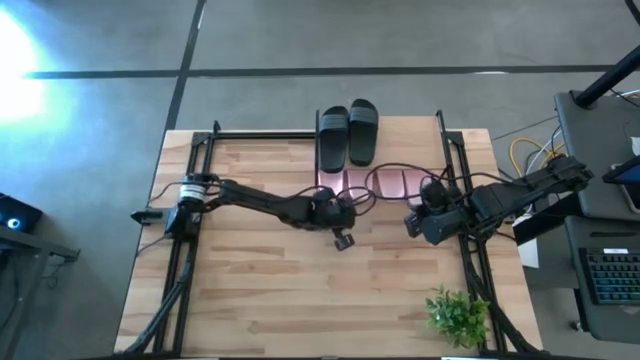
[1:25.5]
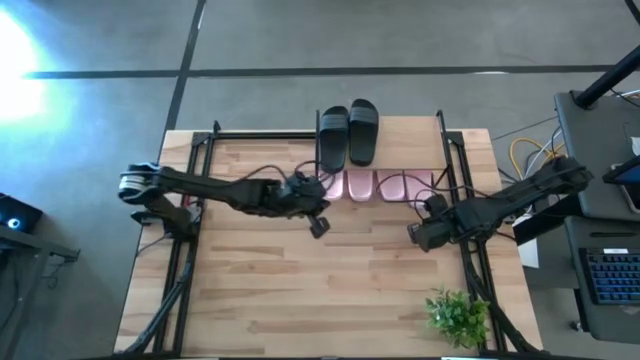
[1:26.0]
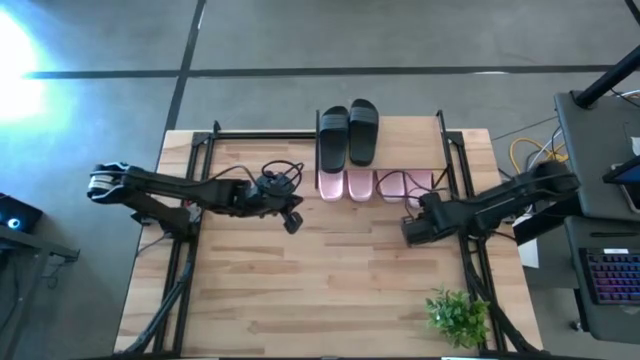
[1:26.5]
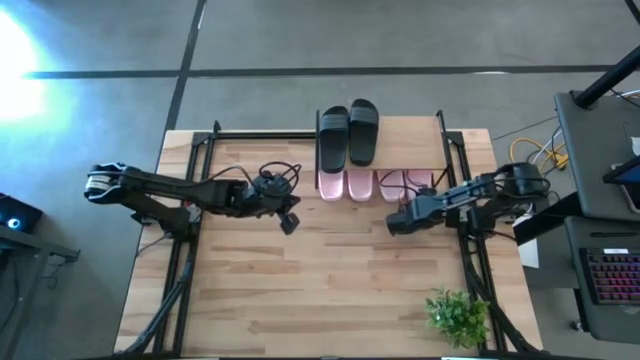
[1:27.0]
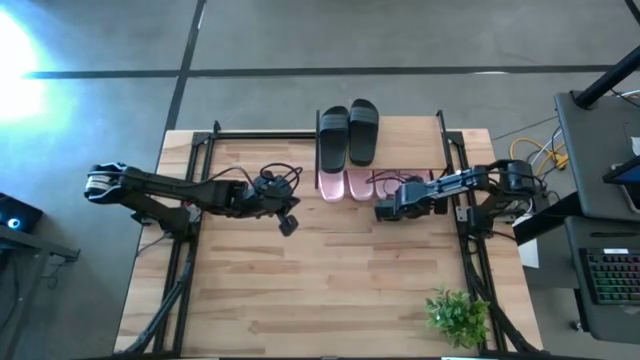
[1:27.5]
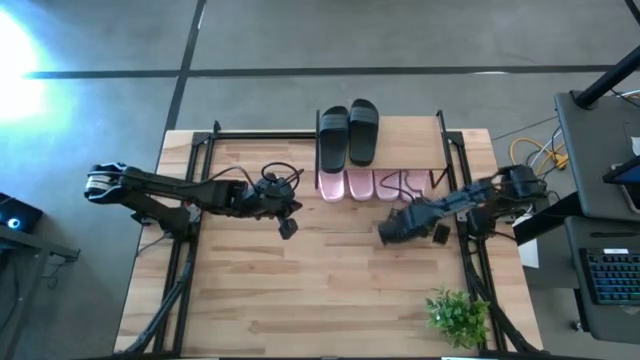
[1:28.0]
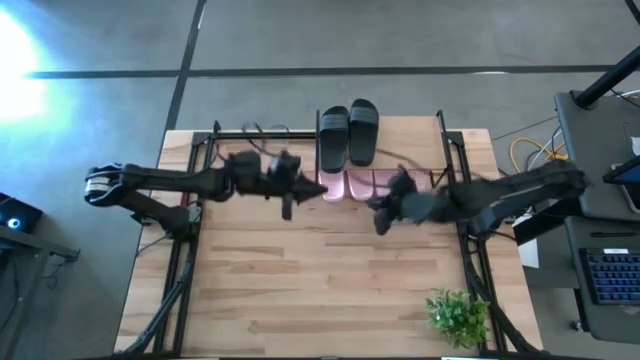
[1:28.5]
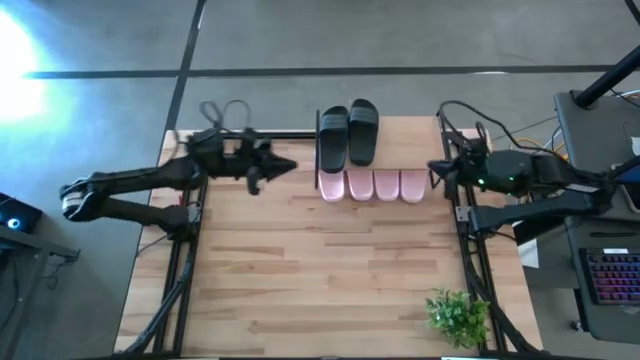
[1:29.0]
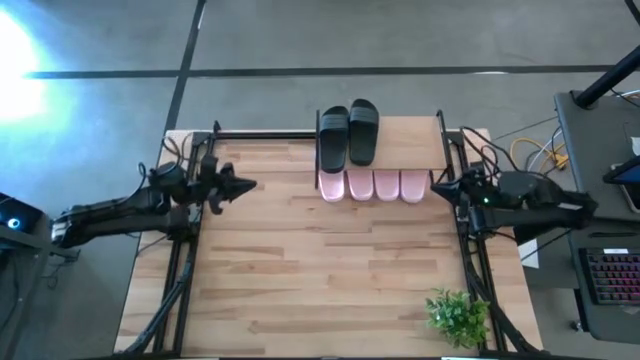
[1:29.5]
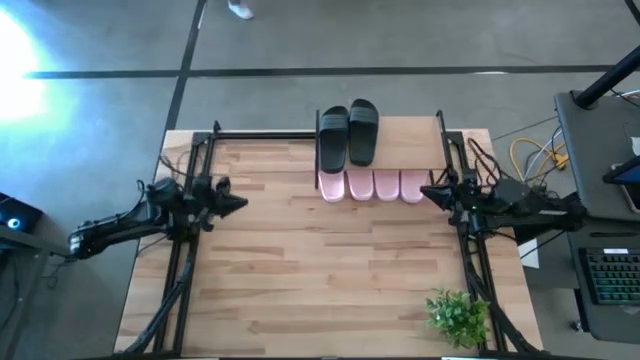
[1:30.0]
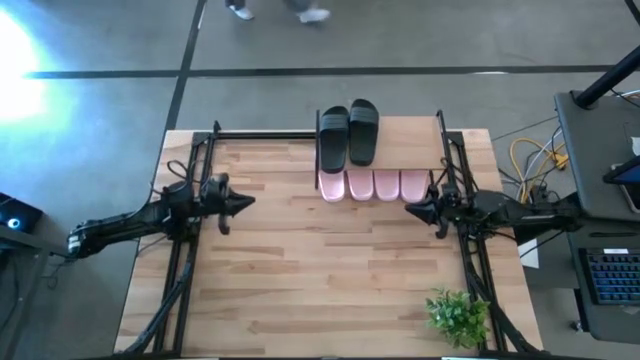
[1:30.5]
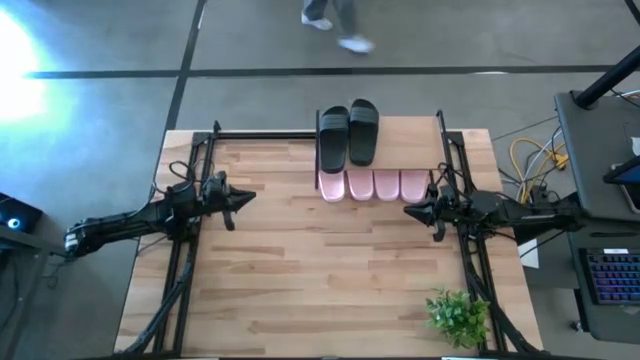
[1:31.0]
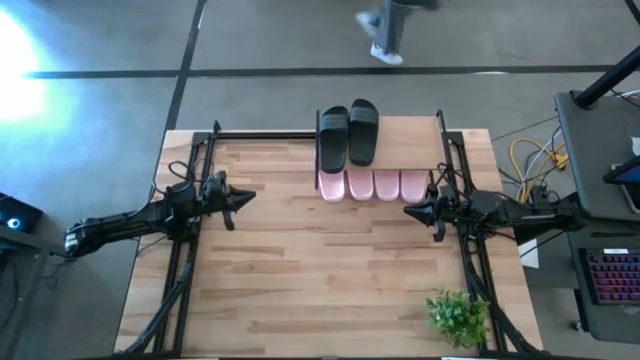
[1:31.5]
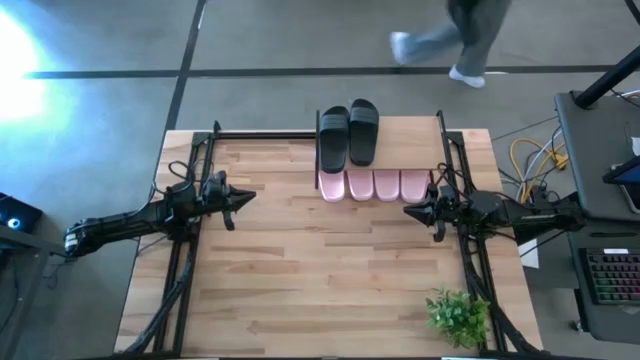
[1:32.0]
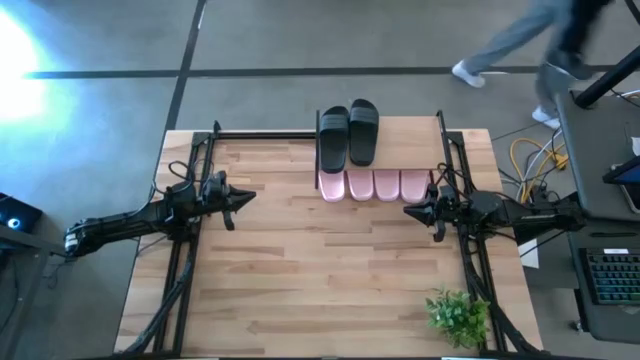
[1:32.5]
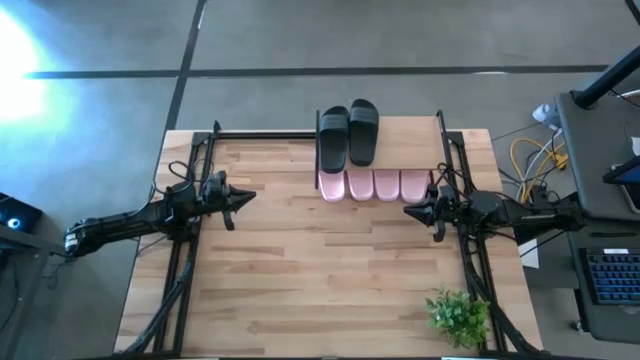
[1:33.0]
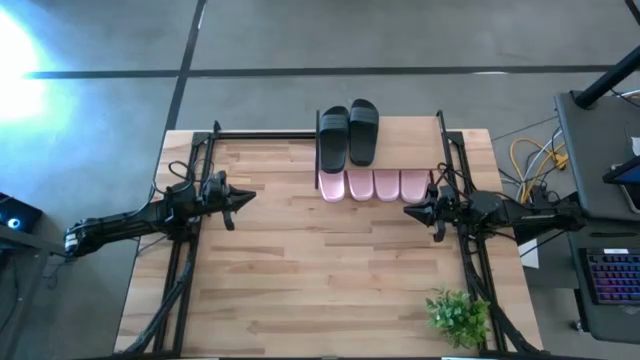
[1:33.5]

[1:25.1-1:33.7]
Task: Pick and place slides into the shelf
Return to Home Position

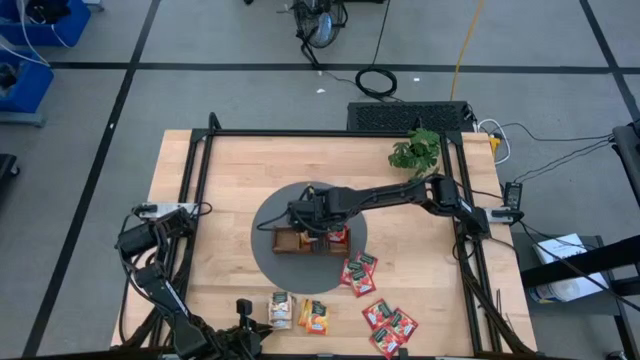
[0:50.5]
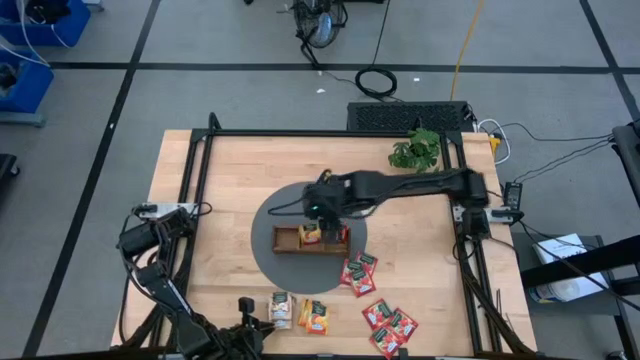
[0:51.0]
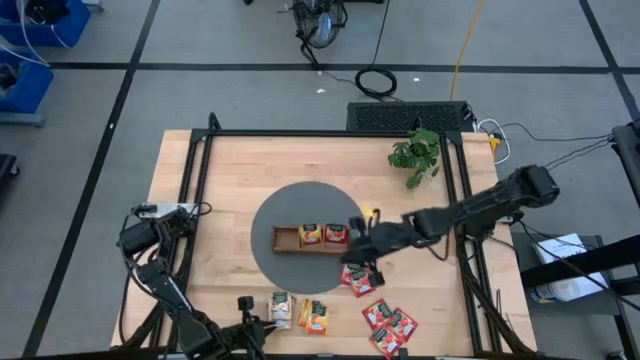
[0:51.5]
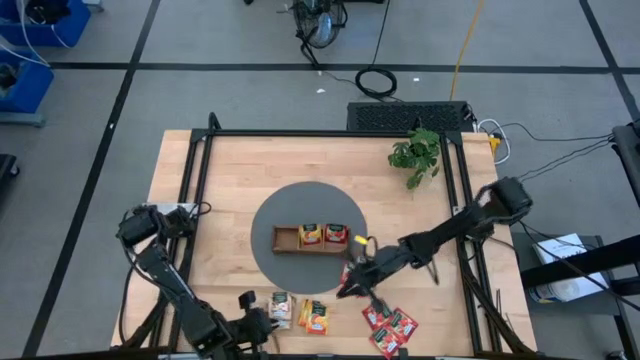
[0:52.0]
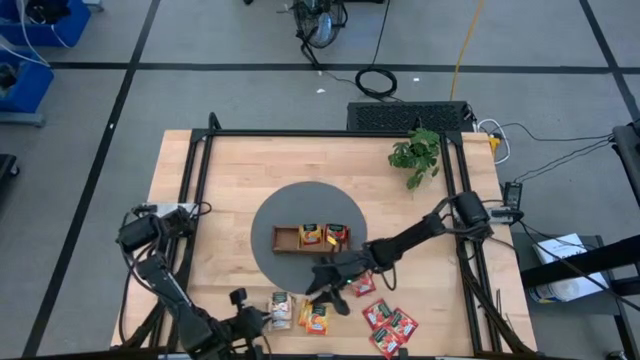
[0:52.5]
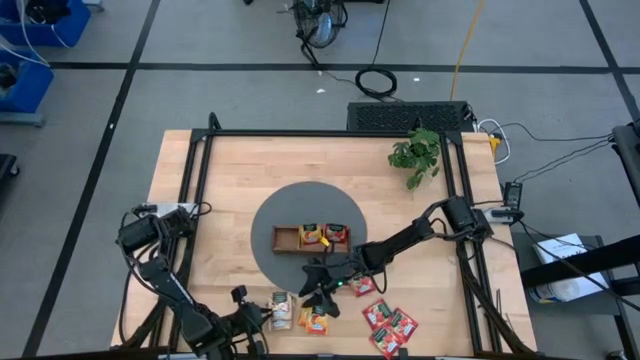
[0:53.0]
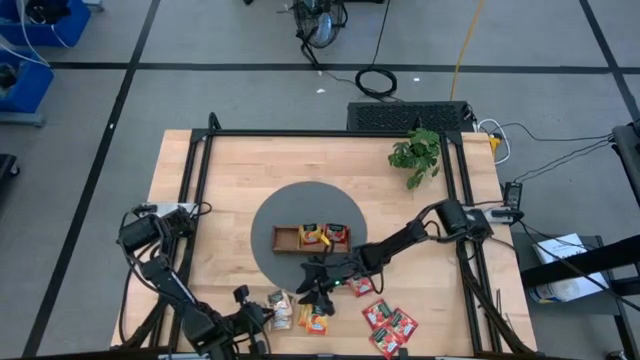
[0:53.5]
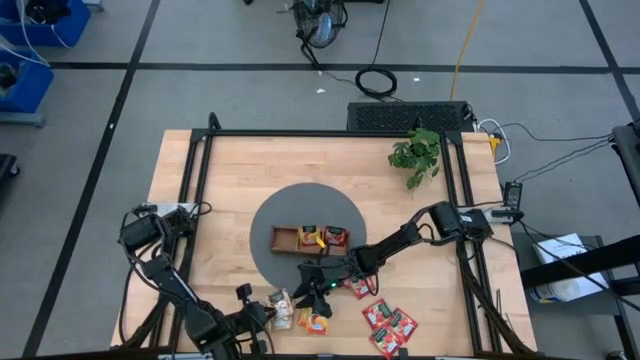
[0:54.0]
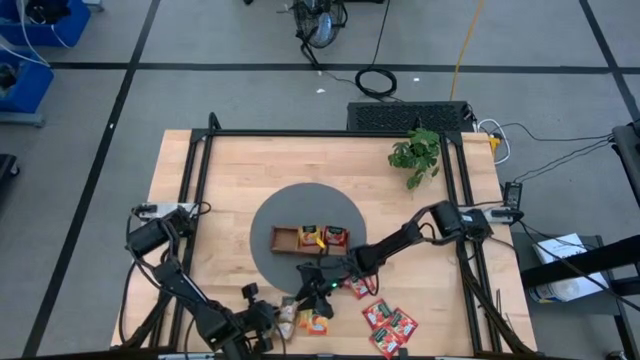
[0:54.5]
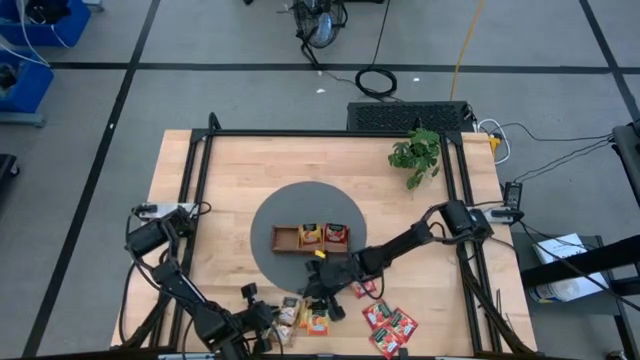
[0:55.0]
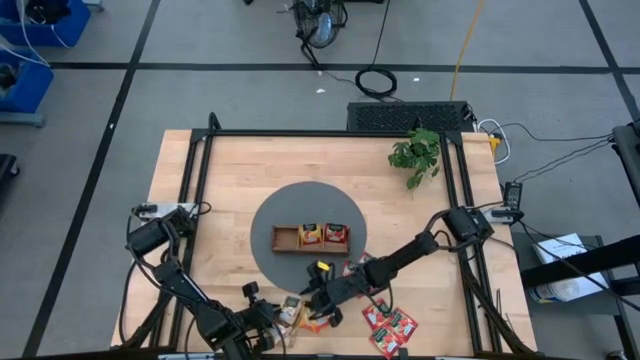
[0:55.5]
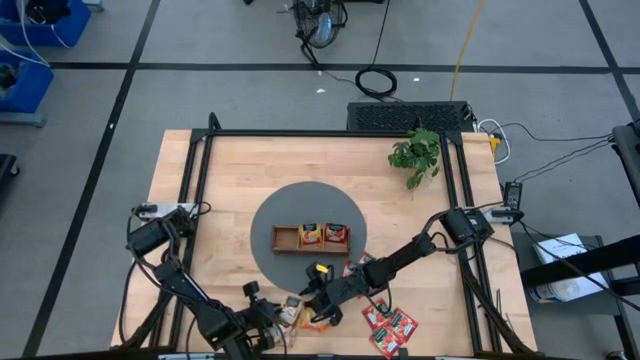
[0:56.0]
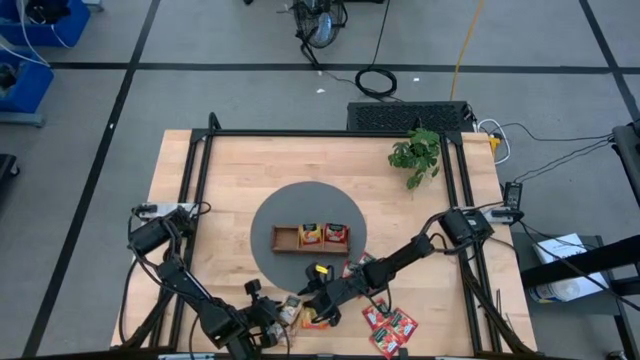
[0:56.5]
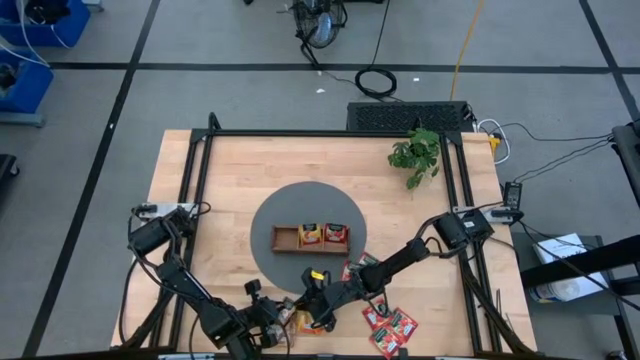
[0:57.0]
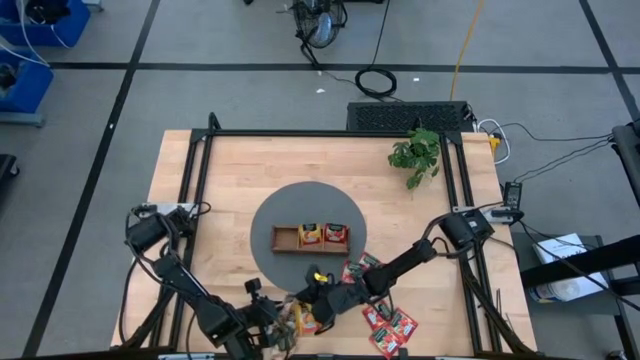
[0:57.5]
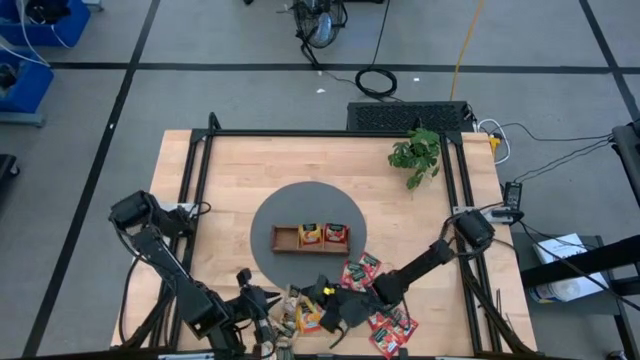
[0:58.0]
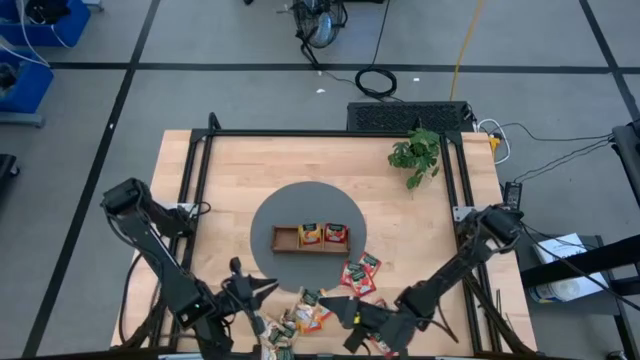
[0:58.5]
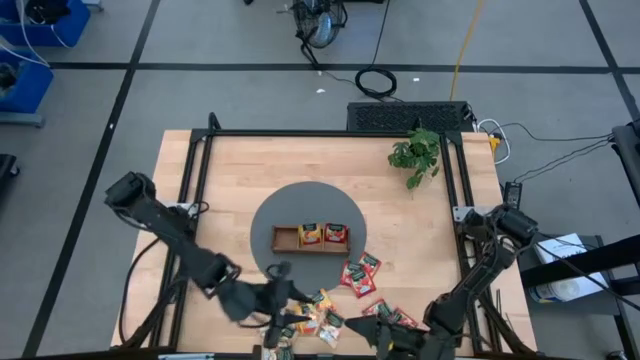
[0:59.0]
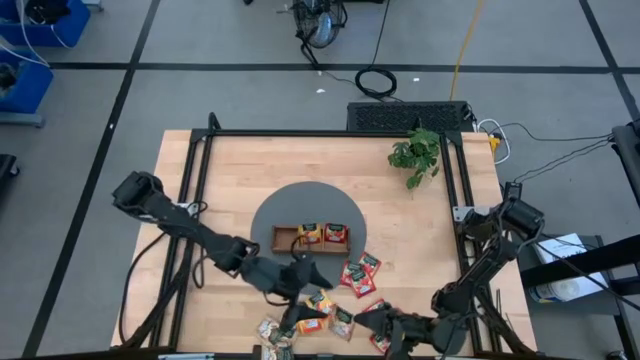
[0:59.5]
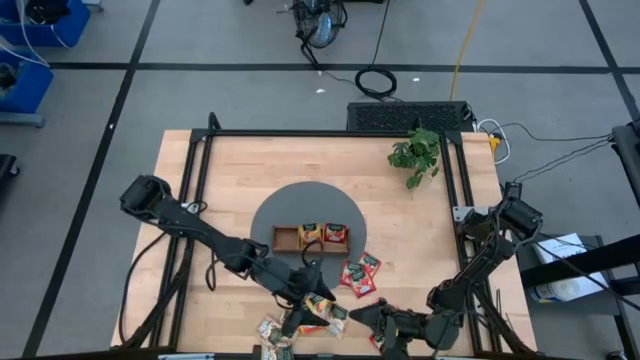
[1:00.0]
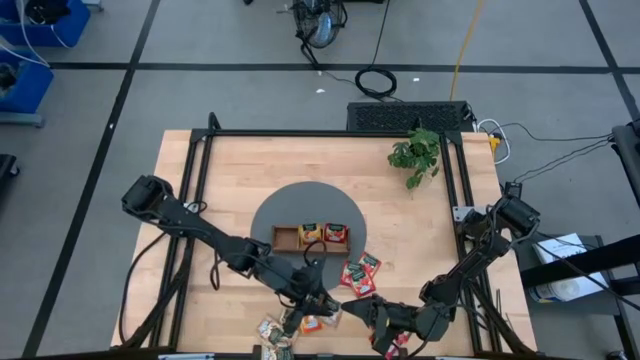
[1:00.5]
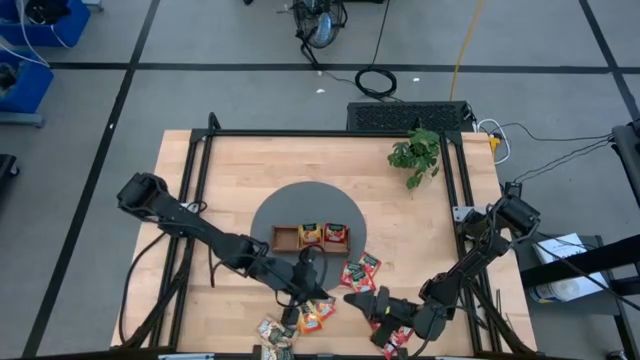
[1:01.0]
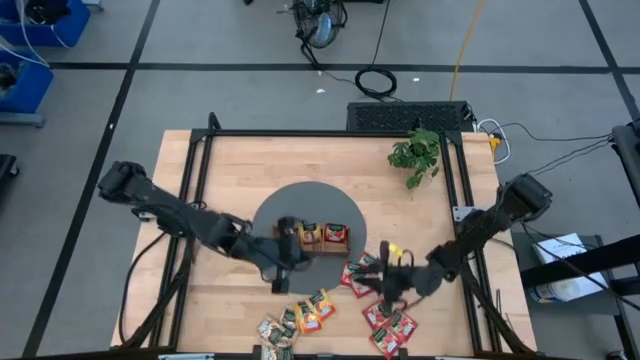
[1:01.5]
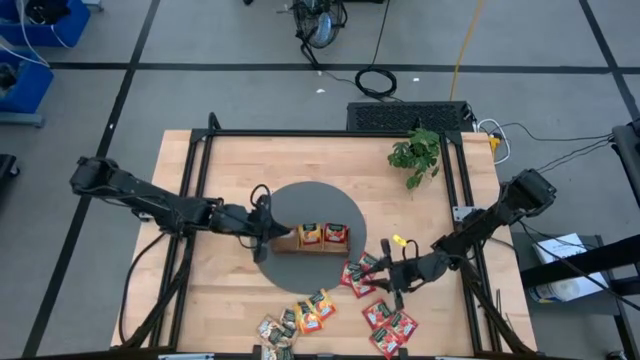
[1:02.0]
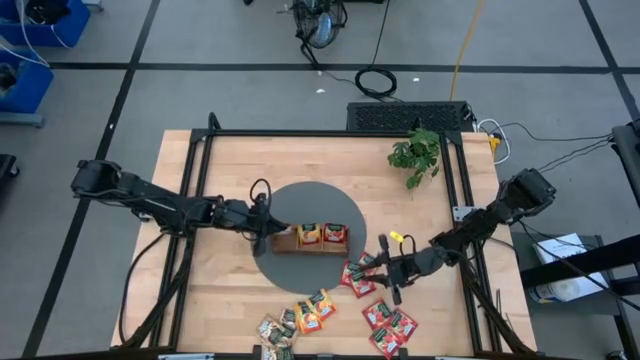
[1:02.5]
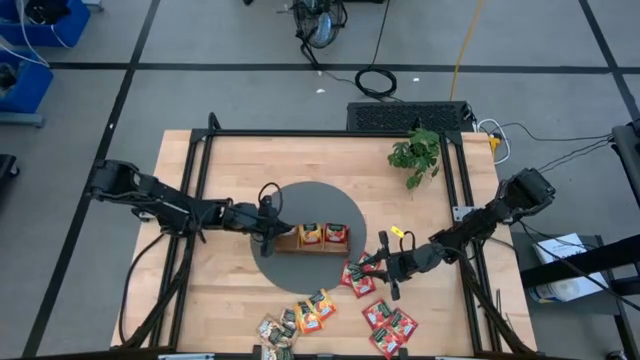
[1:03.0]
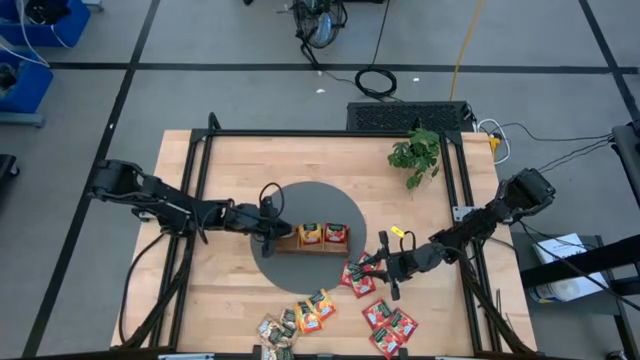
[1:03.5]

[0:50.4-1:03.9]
Task: Pick & Place Tea
Put the light brown tea sachet into the left section of the wooden organizer

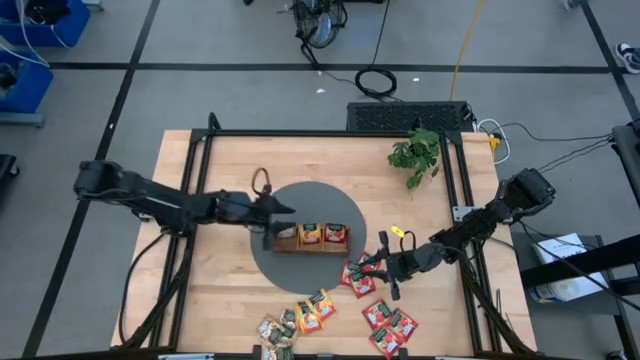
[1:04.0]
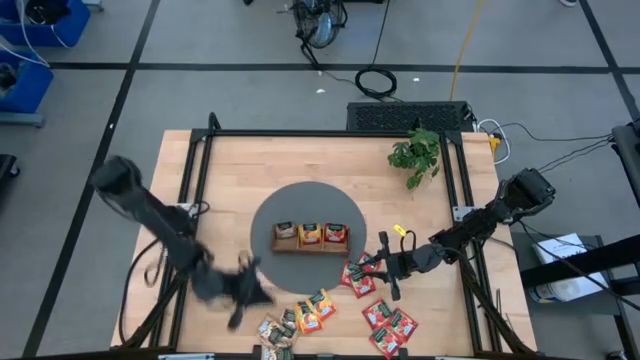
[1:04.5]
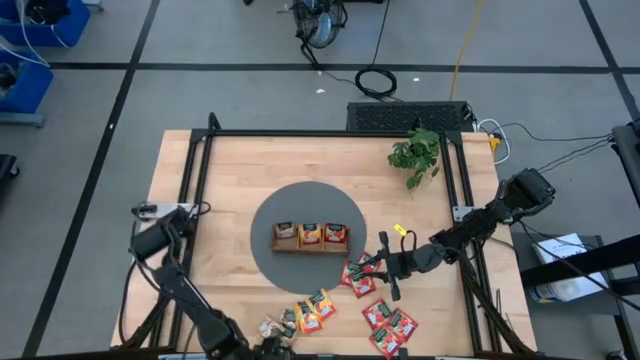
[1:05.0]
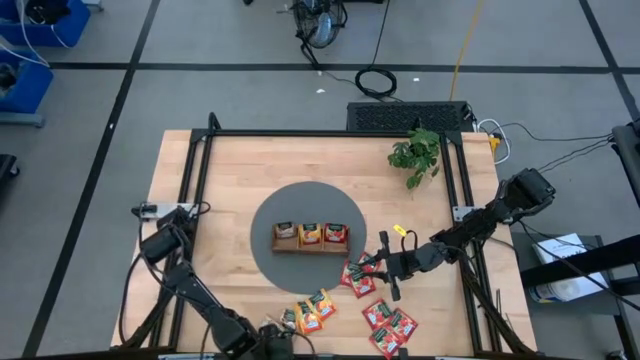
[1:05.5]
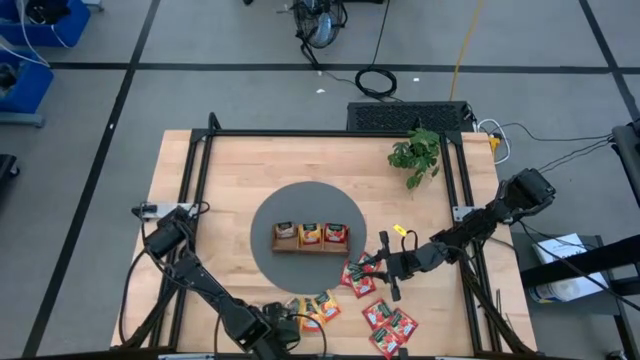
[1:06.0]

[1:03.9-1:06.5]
Adjust the light brown tea sachets on the table
